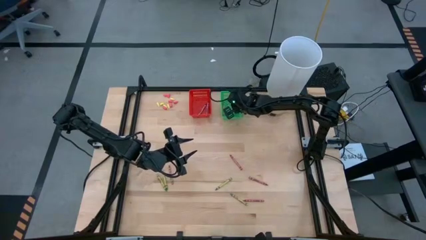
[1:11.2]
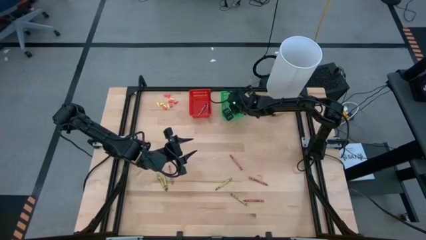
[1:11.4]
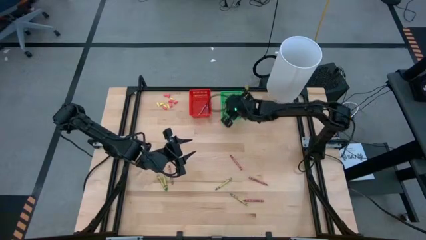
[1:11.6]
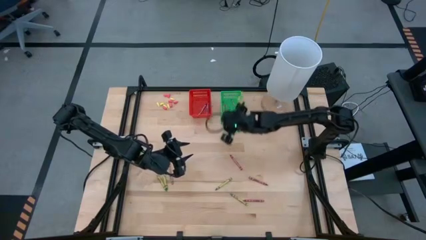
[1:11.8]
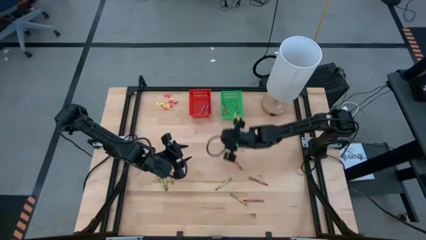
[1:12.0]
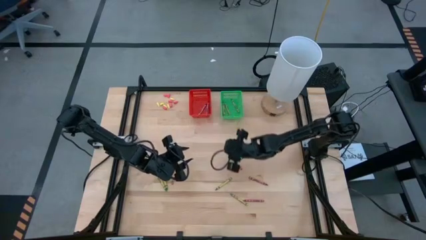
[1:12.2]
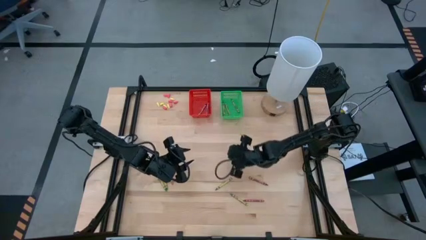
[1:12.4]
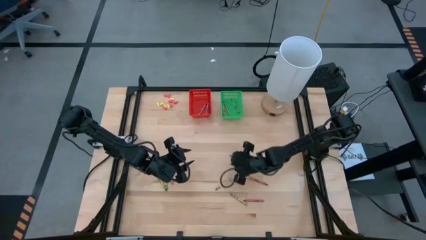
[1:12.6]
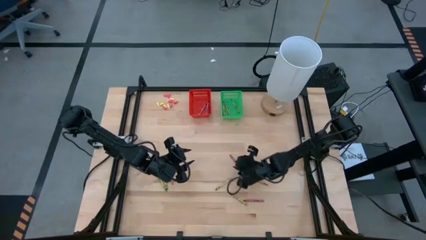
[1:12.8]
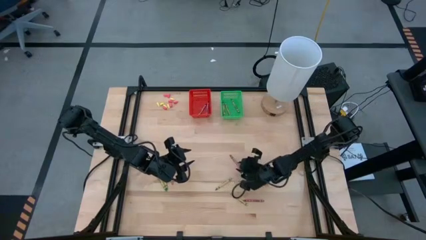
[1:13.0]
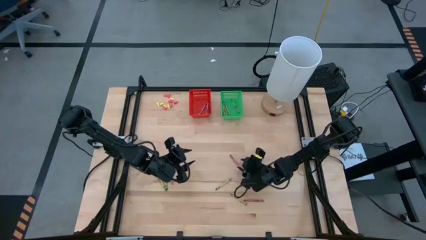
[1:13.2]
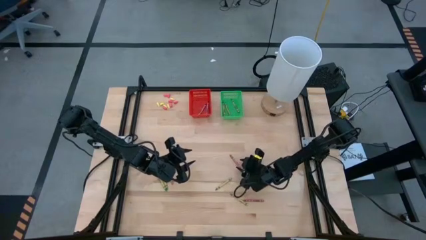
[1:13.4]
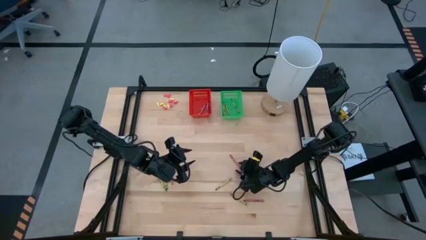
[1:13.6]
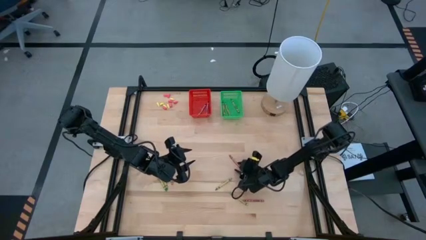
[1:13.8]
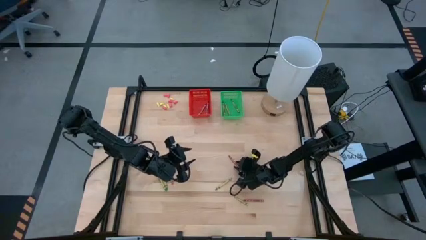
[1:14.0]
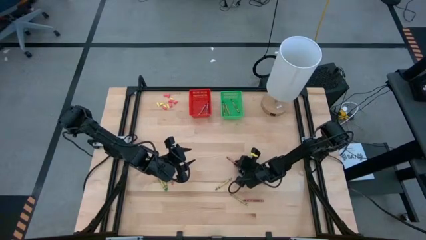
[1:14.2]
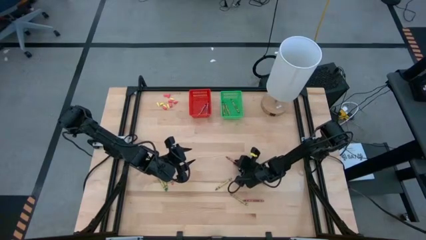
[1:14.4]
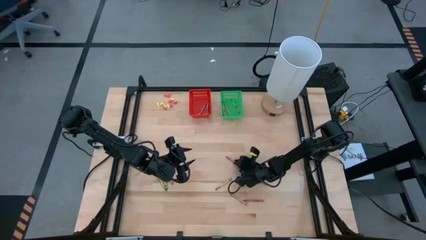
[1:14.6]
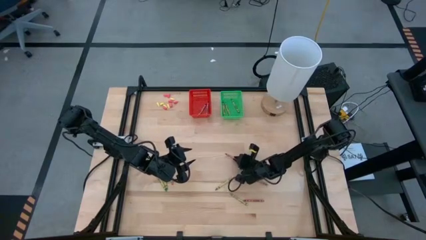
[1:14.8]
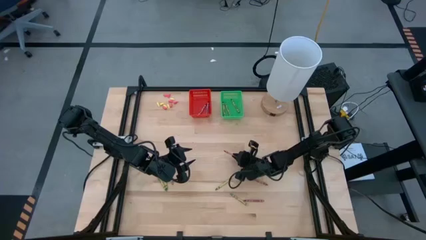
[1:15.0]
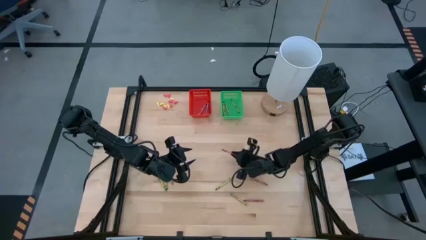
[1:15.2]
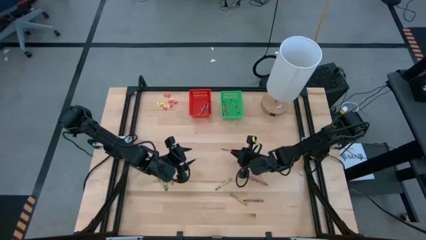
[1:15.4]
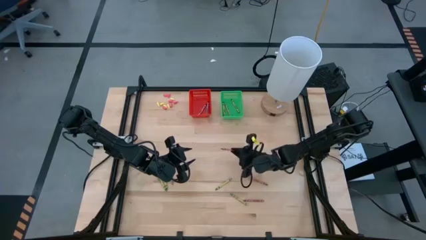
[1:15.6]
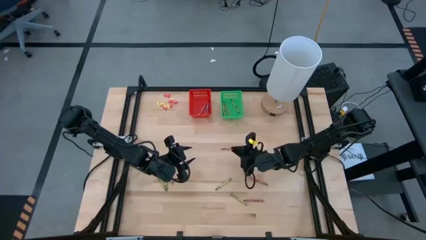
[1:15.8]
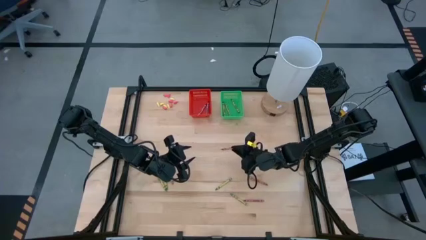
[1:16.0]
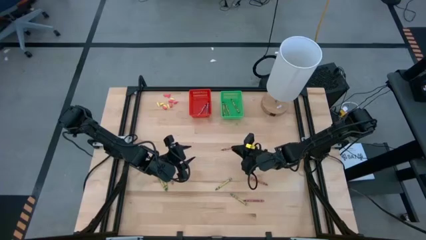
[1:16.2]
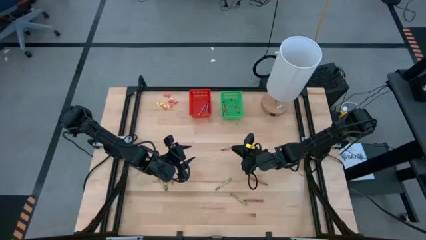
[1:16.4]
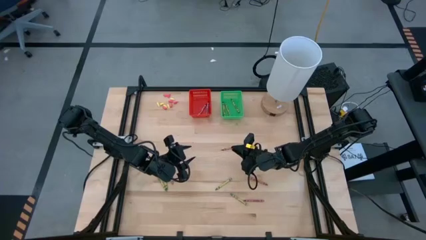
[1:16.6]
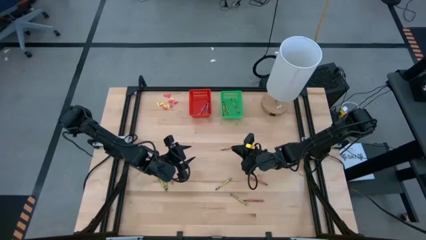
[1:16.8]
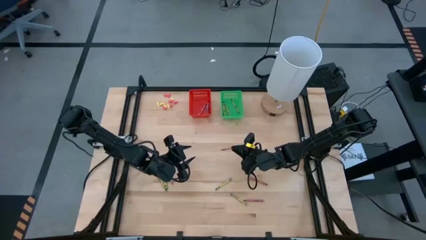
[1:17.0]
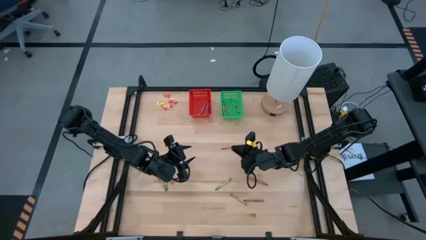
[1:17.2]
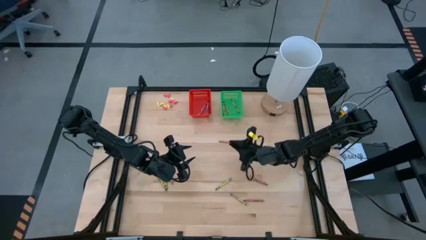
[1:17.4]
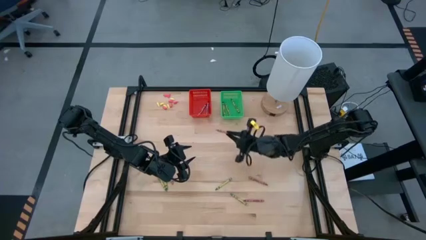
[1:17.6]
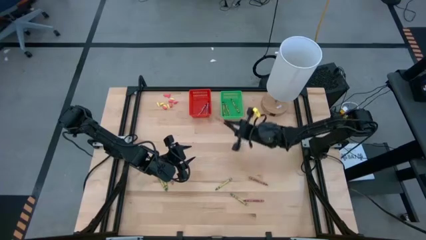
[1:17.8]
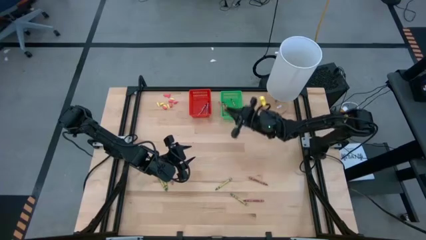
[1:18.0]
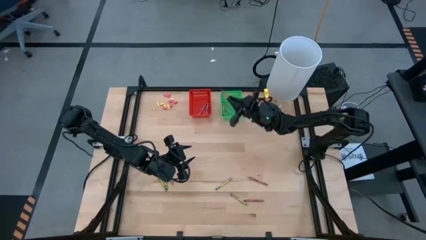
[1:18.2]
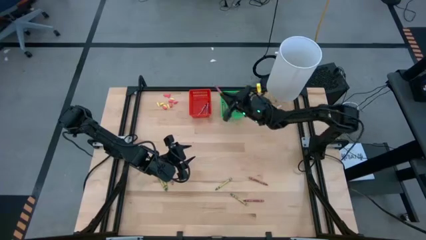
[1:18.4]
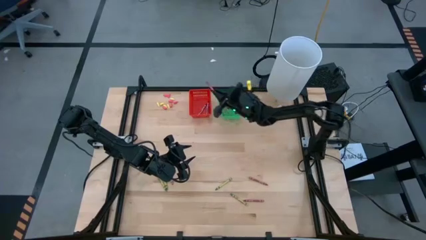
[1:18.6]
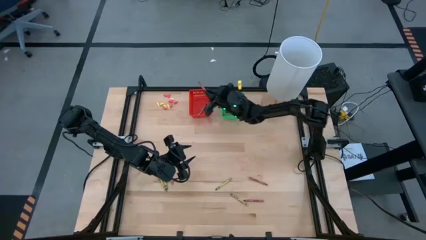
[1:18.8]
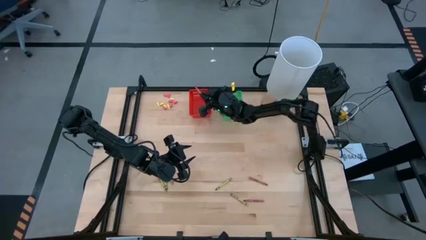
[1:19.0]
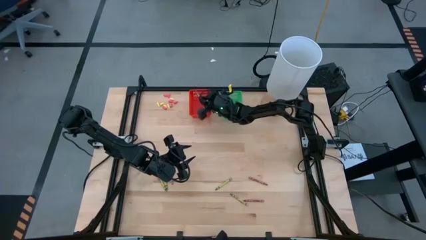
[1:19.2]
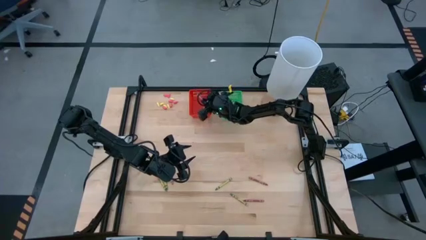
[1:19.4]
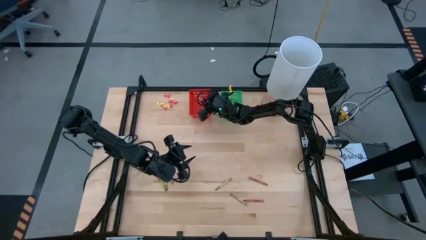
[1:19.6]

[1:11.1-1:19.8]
Task: Sort crayons
Put the red crayon into the red bin

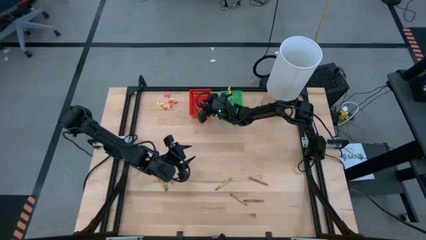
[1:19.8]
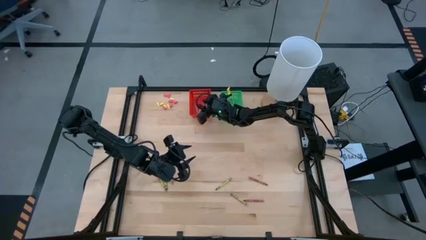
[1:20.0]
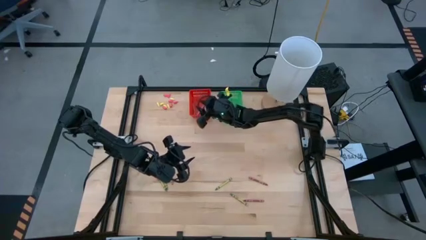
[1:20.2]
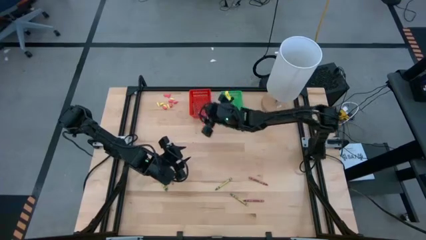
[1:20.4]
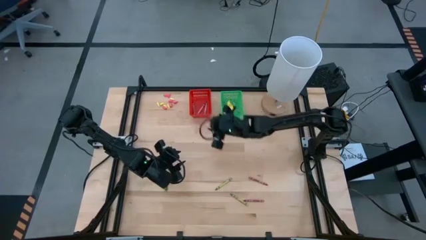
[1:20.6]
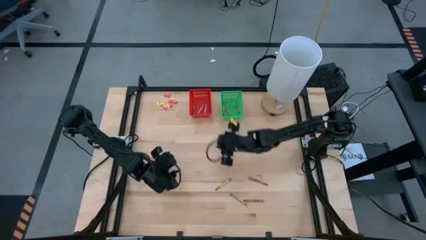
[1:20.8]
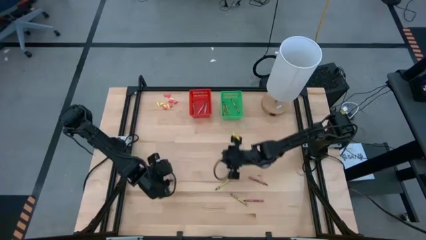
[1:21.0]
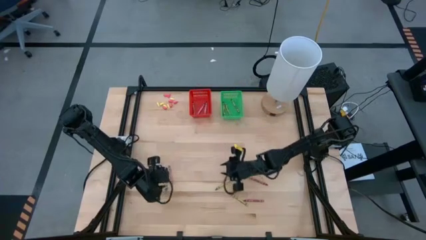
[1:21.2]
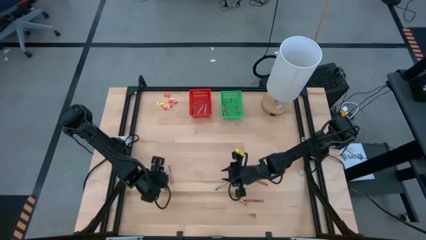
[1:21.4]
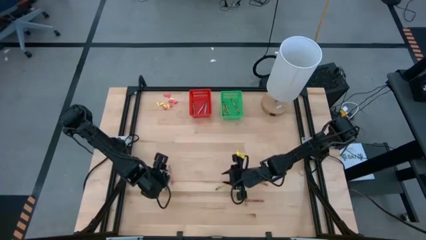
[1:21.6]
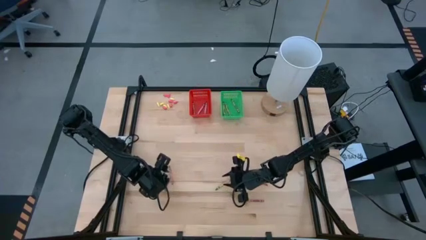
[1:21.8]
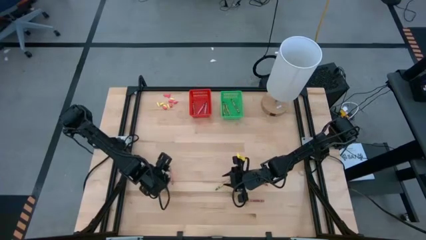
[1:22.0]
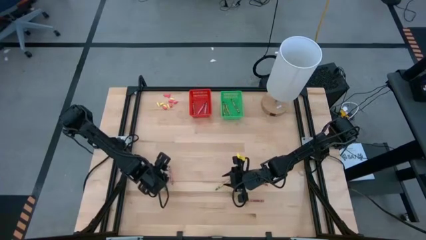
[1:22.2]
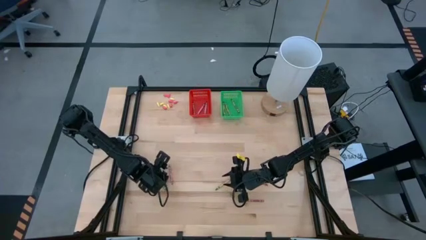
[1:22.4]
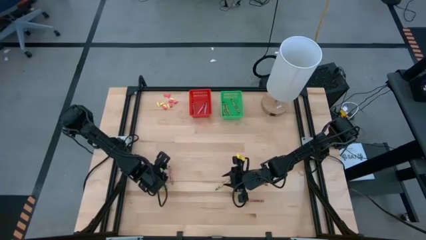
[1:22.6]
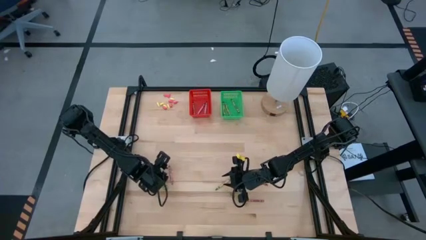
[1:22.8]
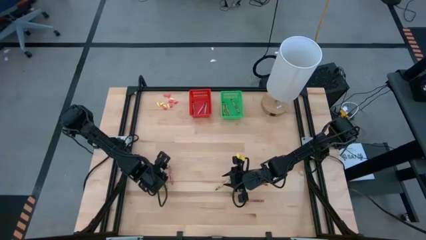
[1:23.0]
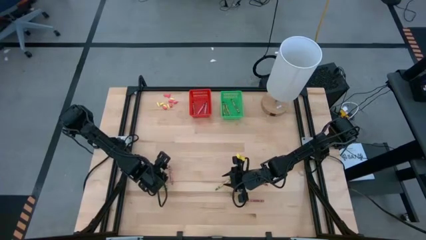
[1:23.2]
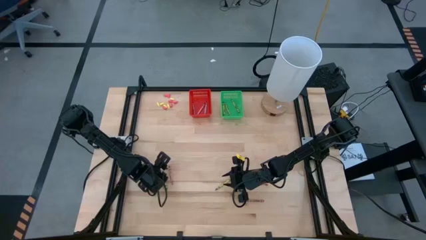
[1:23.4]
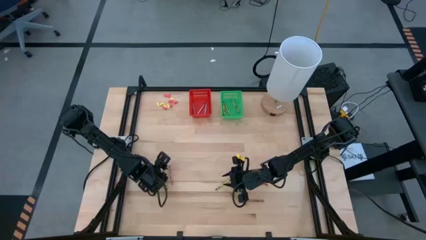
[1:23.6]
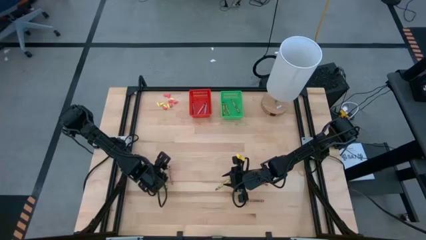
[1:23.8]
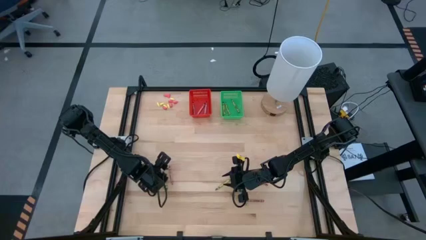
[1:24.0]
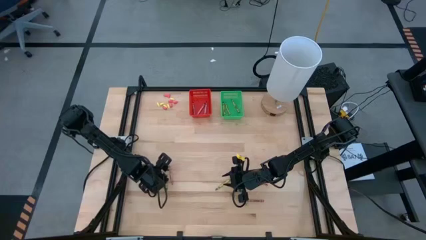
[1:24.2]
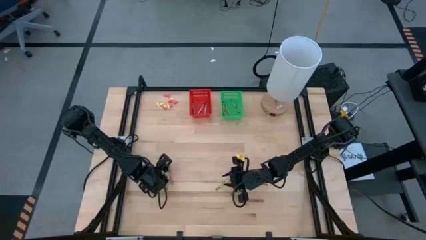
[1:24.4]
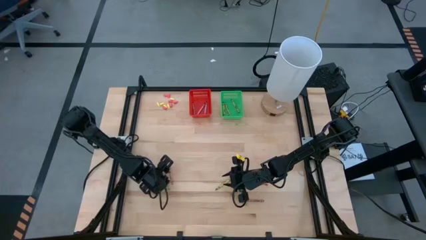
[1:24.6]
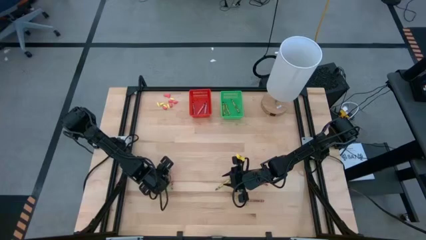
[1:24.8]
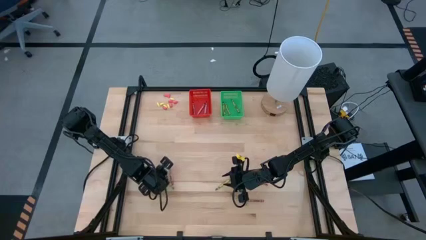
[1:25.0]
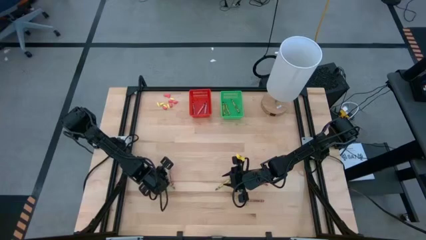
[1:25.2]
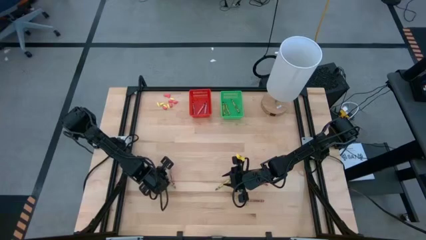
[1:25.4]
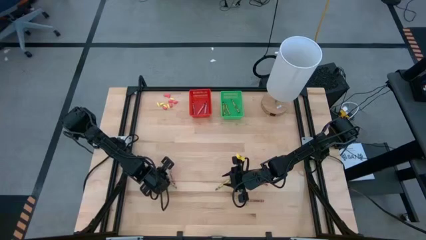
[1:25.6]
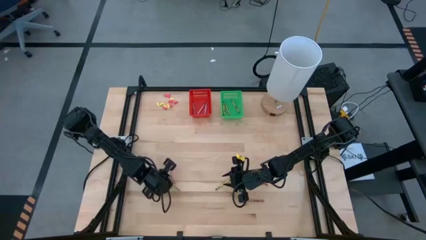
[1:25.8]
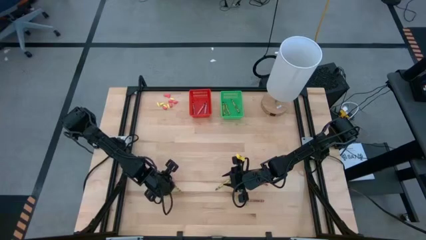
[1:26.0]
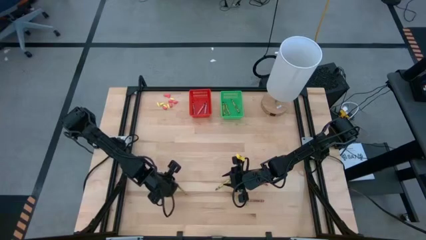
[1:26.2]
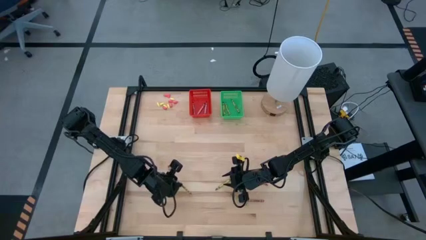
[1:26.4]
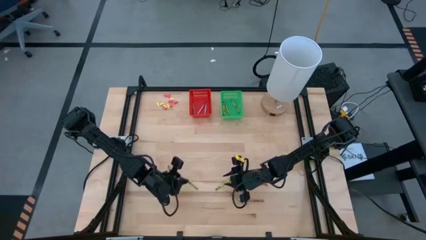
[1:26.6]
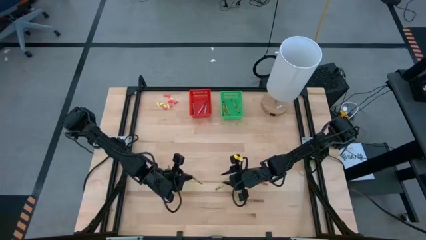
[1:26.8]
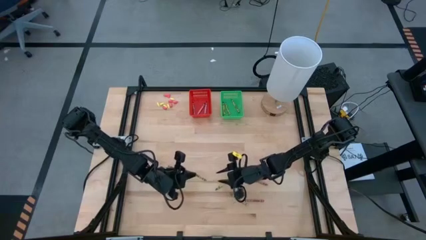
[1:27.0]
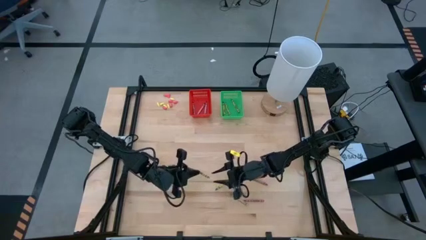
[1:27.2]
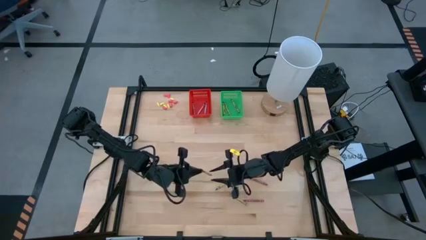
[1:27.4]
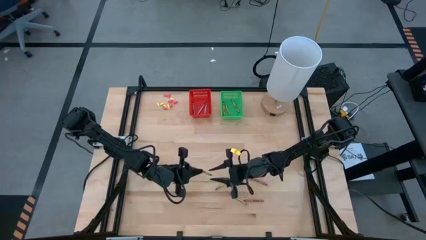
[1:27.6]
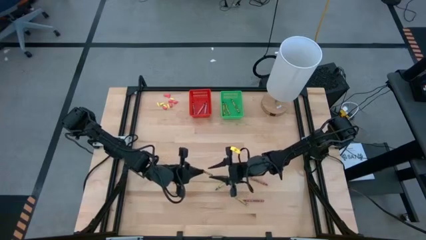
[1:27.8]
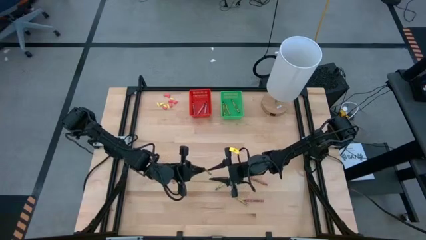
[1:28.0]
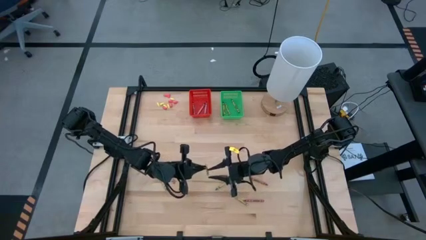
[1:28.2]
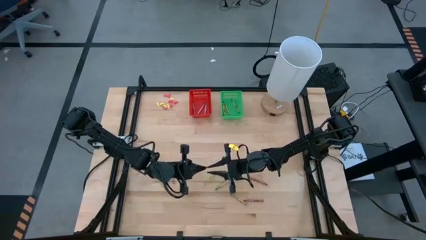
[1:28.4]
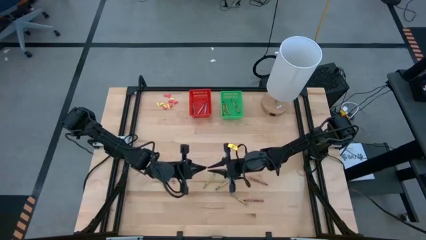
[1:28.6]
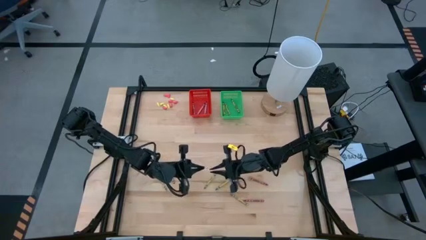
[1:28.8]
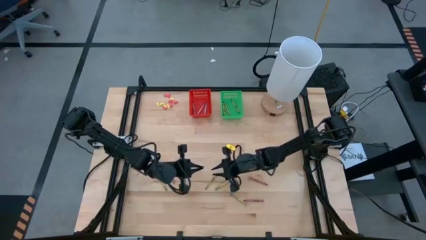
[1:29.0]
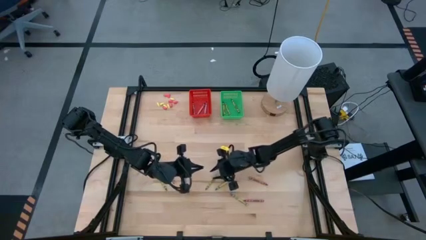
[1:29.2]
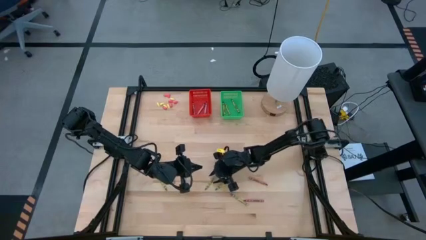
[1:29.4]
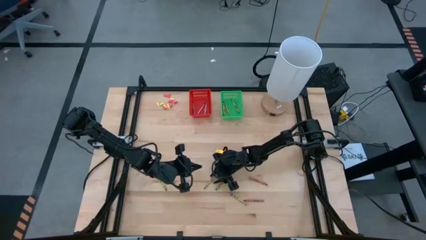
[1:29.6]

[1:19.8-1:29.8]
Put the green crayon into the green bin
